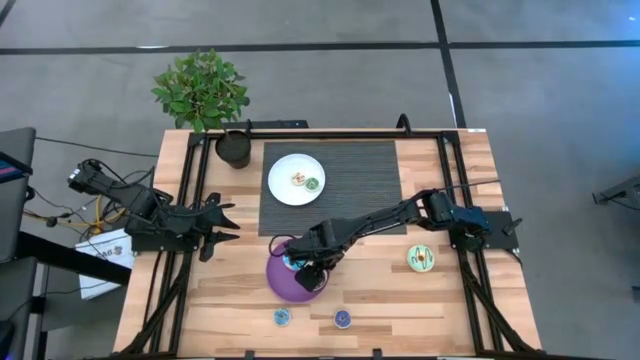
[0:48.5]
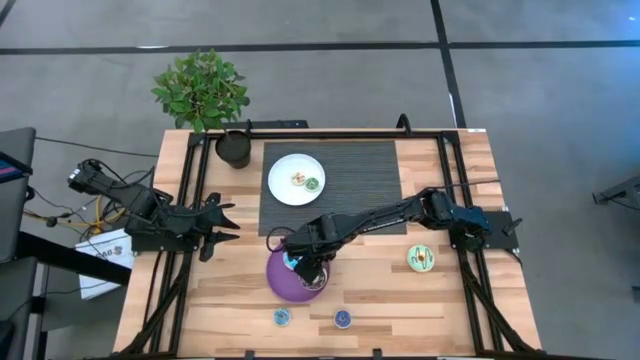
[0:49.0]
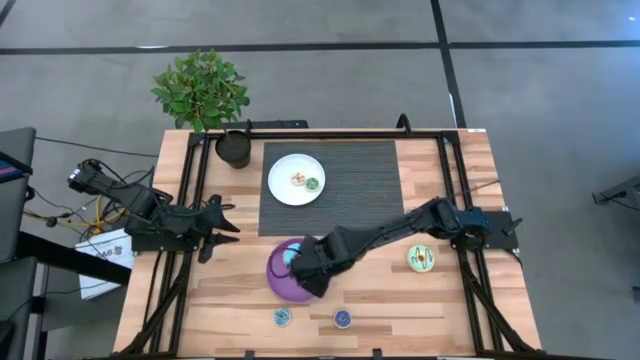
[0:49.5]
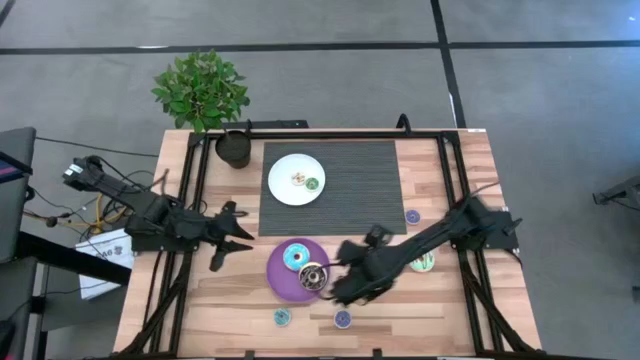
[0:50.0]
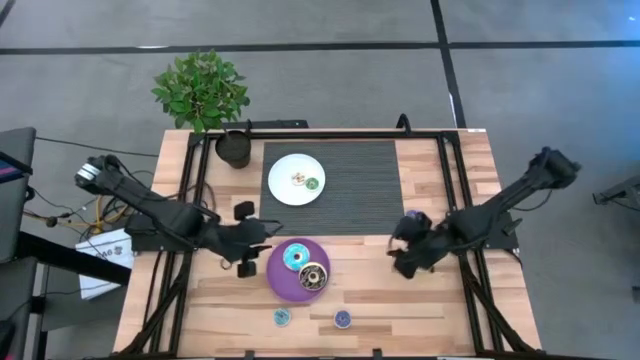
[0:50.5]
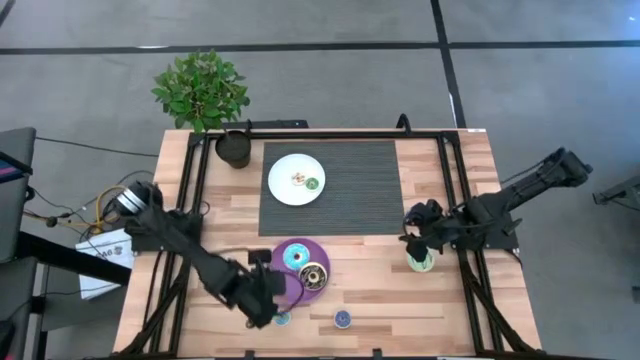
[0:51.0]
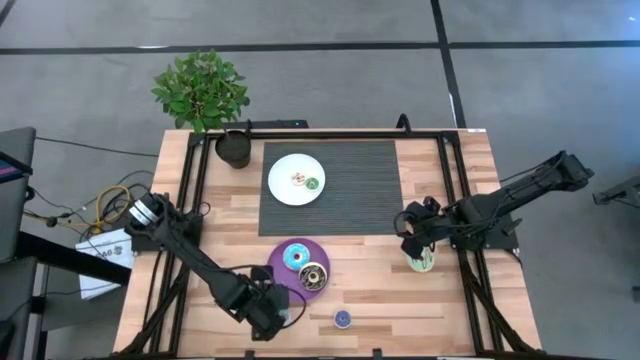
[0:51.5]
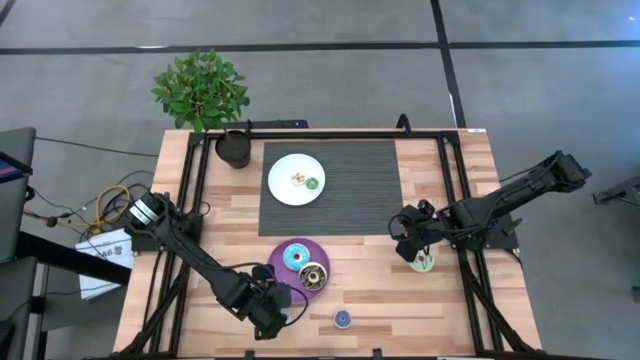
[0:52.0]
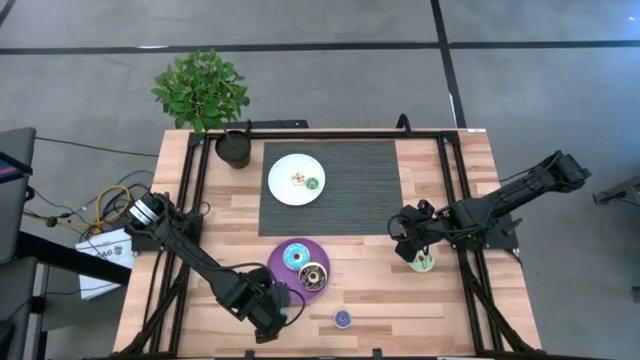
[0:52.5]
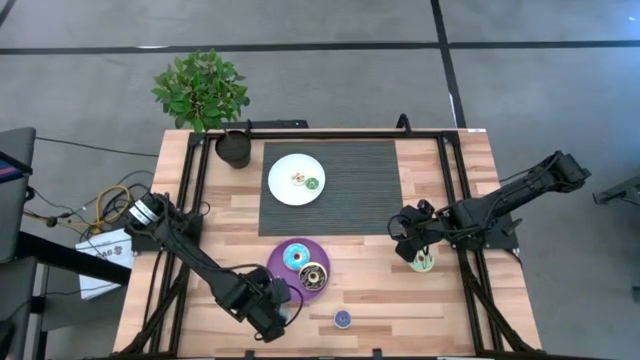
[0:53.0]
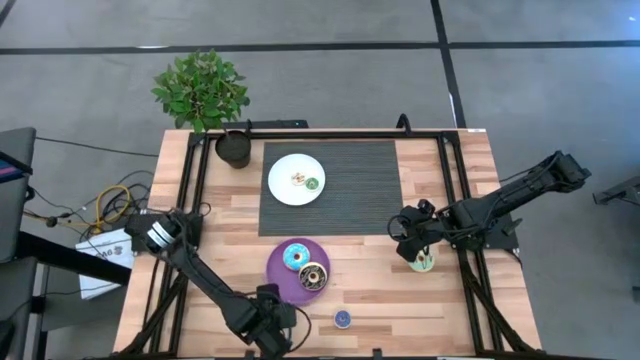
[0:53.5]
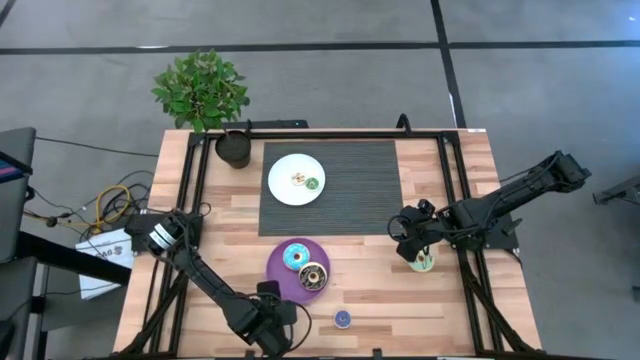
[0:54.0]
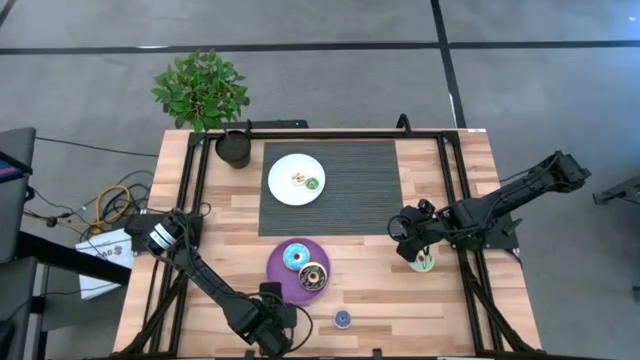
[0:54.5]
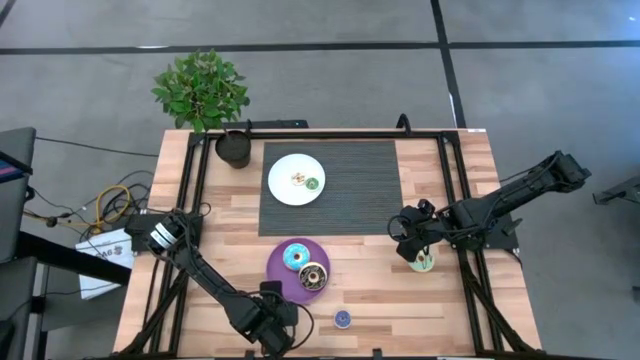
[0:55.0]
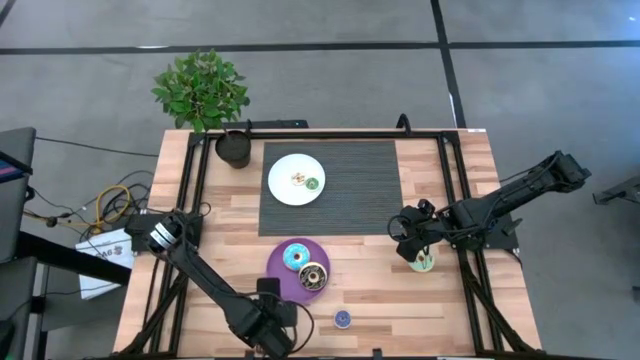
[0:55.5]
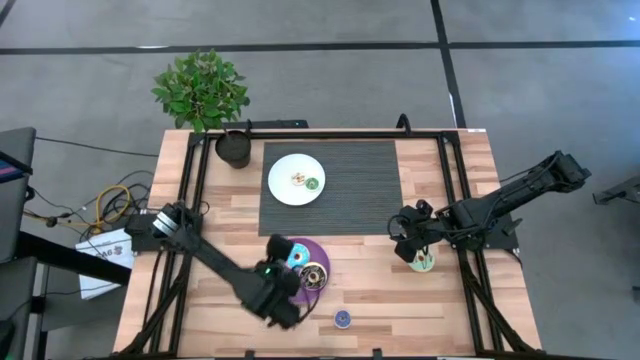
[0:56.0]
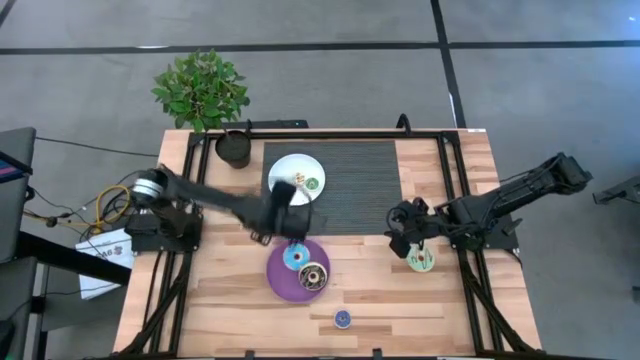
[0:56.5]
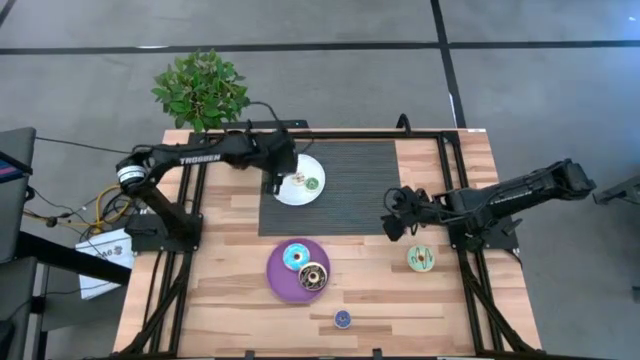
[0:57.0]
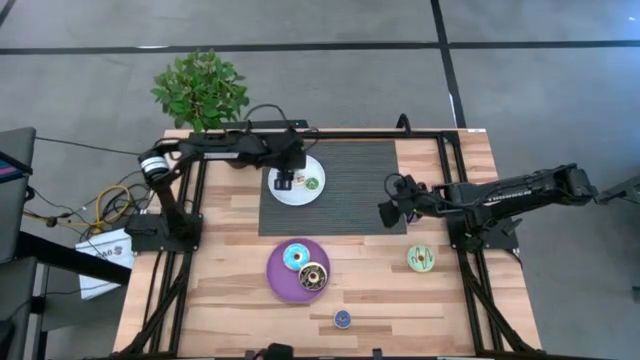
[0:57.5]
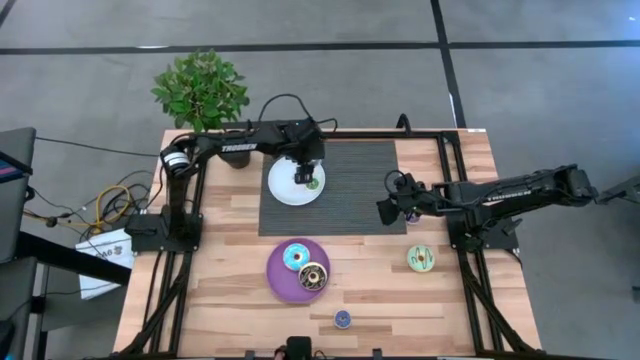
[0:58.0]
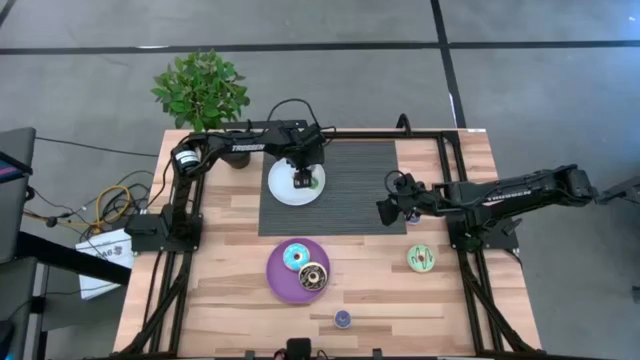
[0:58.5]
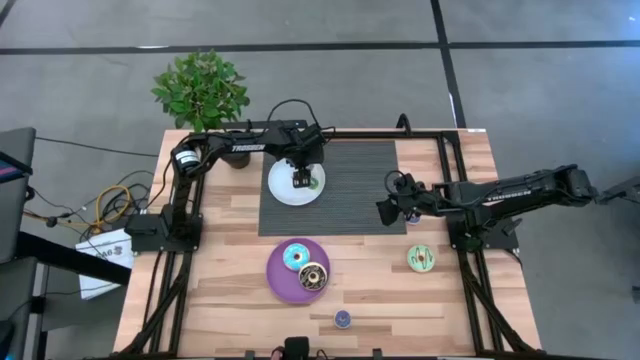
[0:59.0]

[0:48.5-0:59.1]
Task: Pick & Place donuts
Put the small light blue donut on the white plate

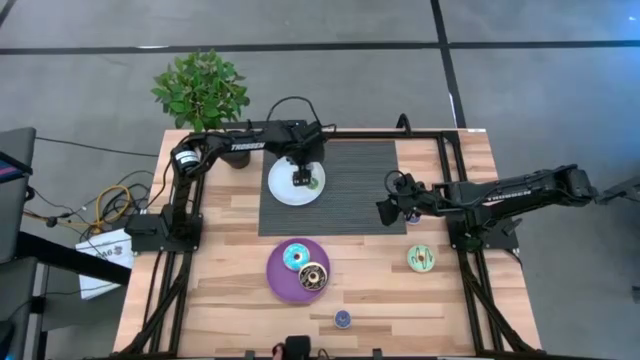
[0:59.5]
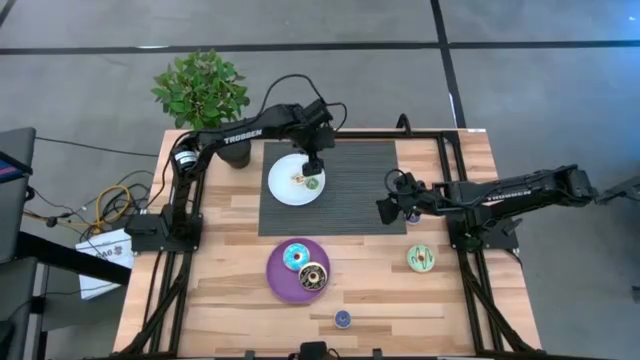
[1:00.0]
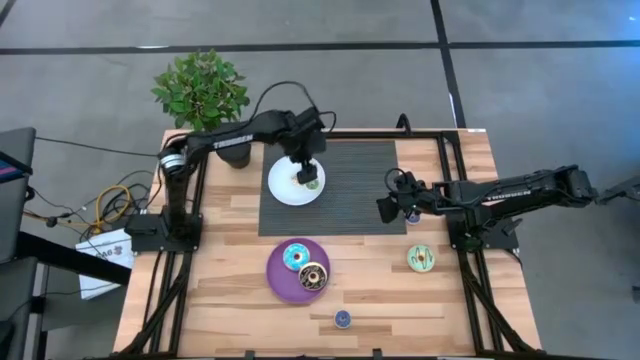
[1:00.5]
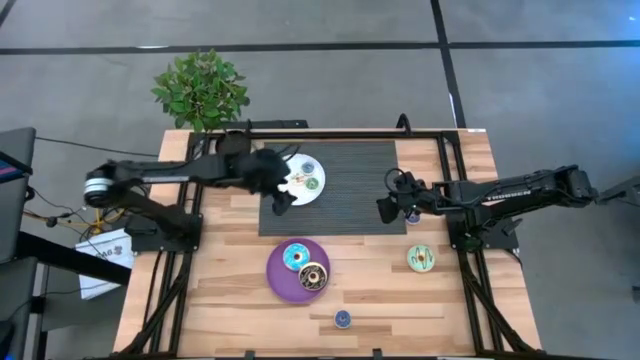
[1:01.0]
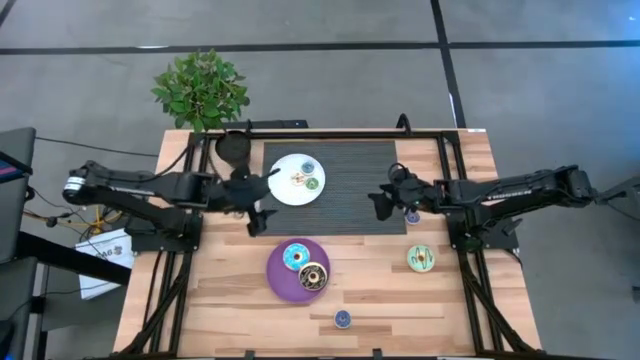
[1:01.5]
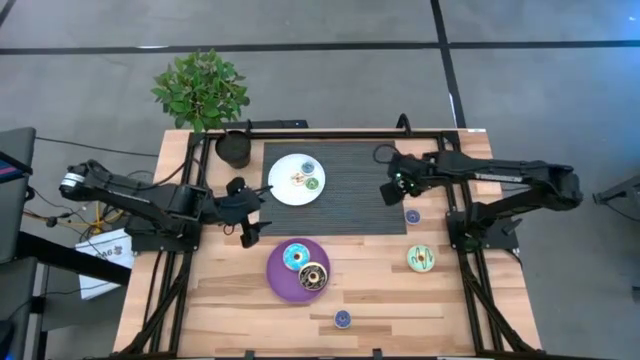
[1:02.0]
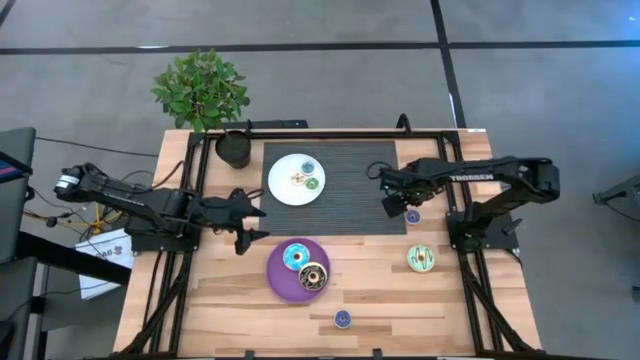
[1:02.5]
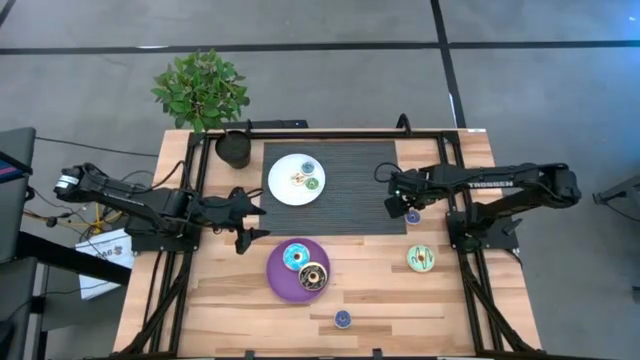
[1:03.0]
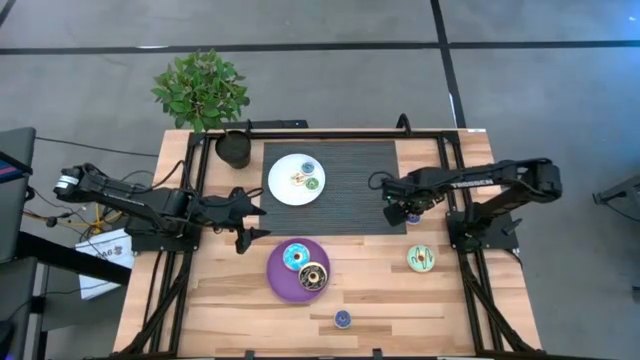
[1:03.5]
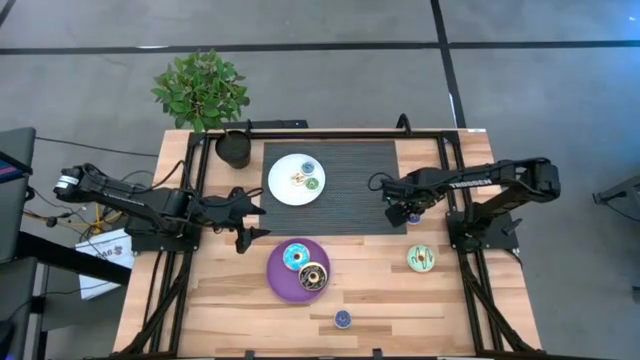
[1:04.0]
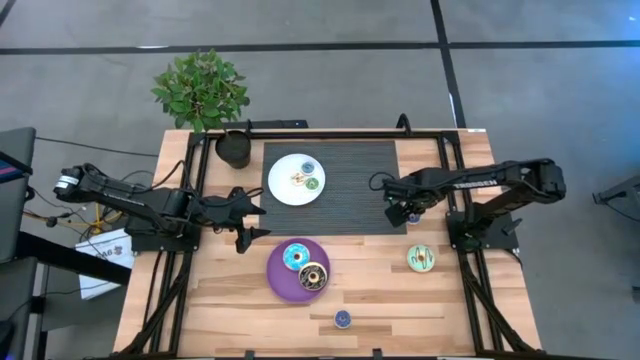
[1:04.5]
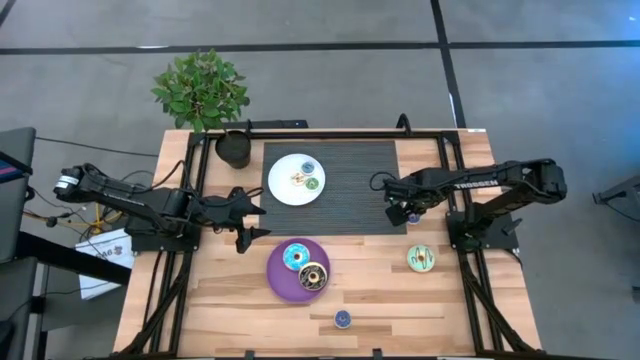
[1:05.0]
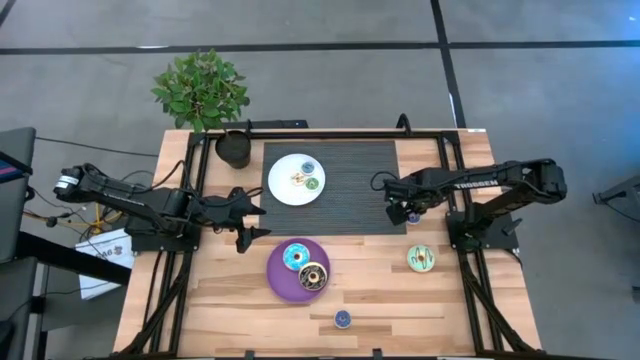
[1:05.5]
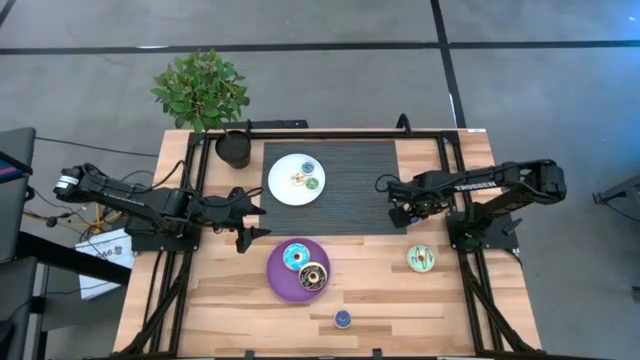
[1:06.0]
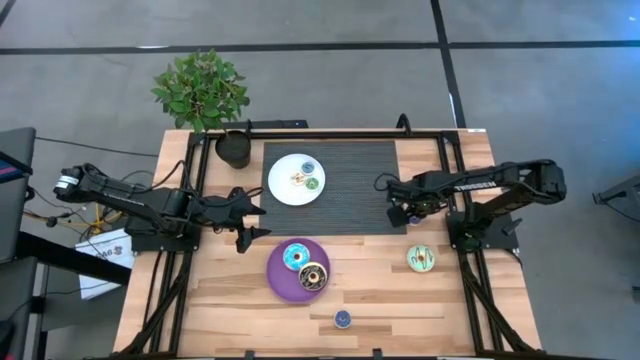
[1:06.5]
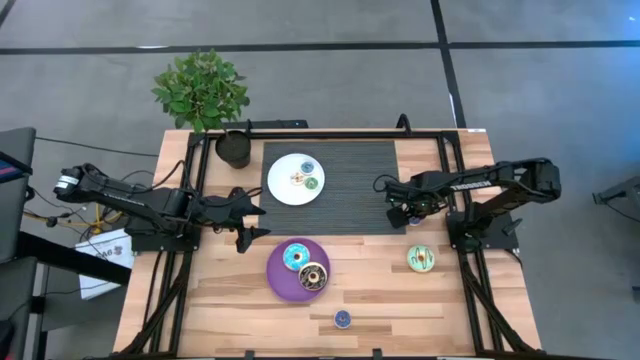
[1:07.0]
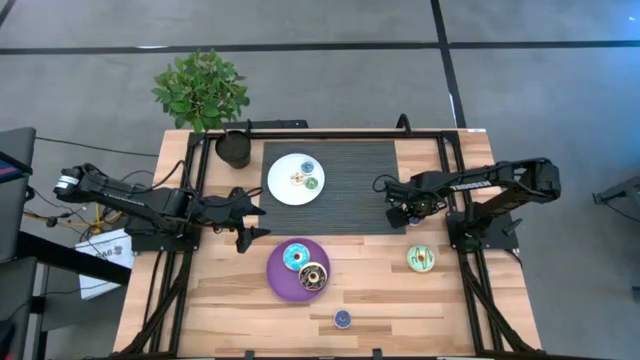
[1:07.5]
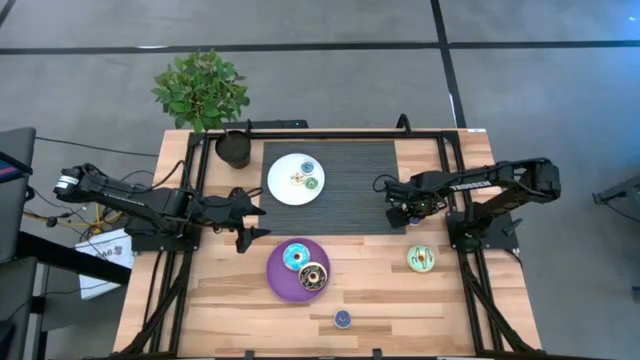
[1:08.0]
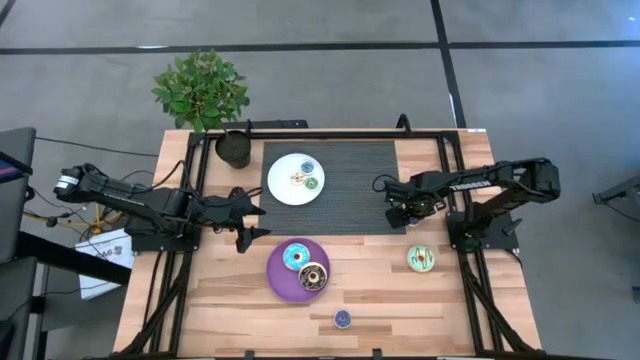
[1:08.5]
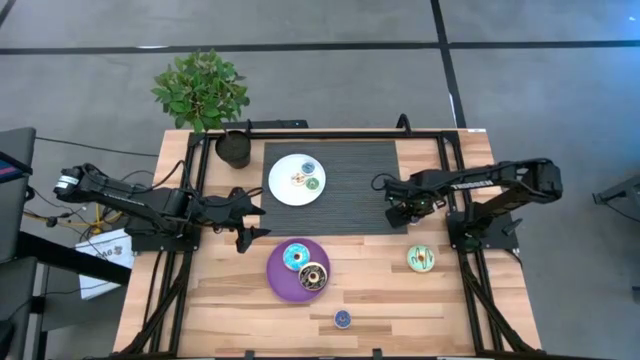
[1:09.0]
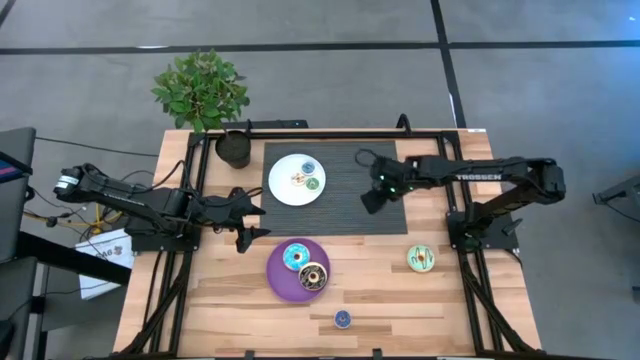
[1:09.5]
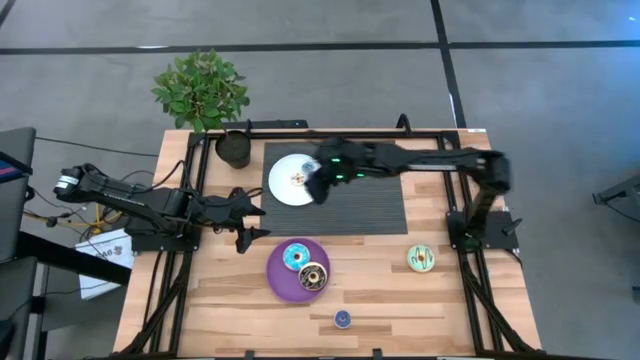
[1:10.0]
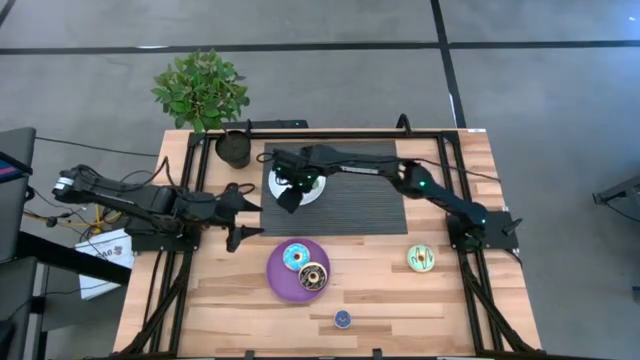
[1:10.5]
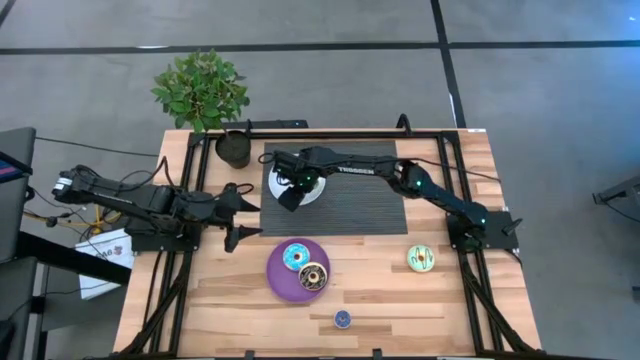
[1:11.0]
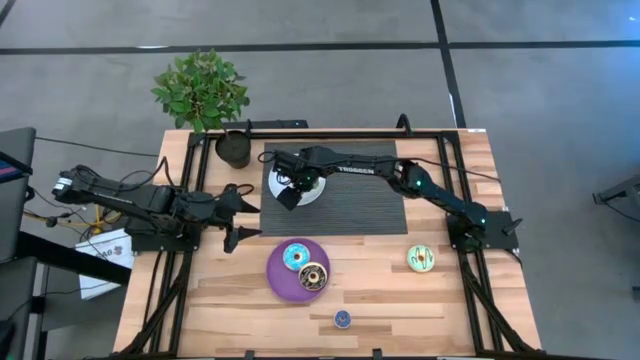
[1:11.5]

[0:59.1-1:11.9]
Put the top small blue donut on the white plate
